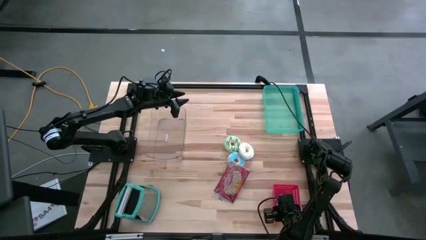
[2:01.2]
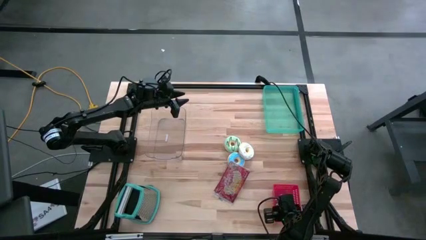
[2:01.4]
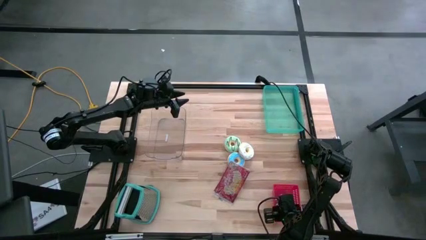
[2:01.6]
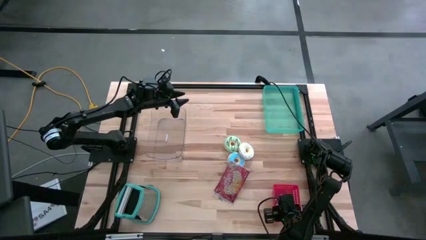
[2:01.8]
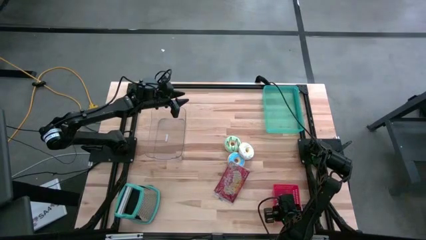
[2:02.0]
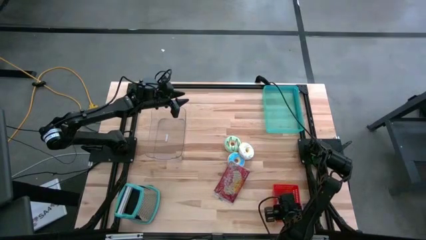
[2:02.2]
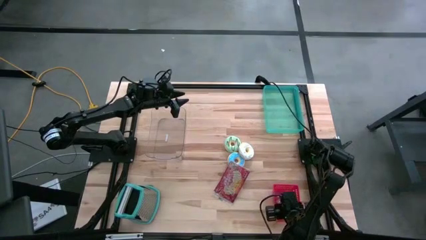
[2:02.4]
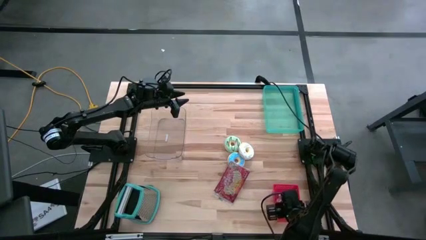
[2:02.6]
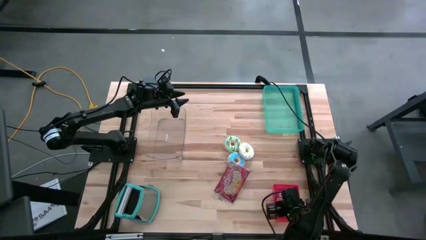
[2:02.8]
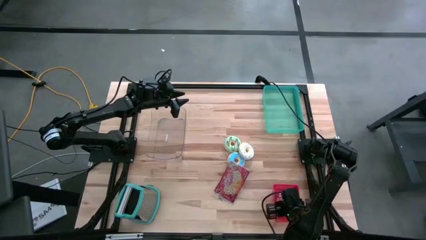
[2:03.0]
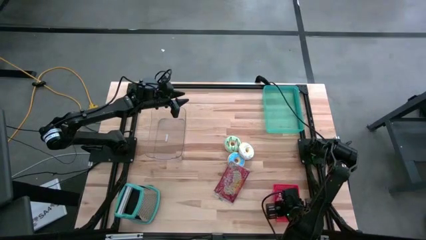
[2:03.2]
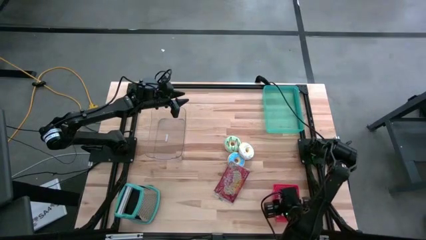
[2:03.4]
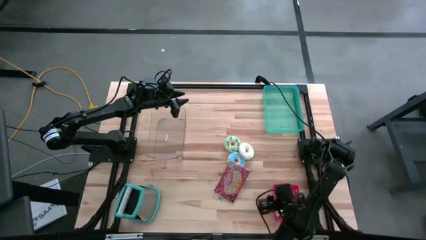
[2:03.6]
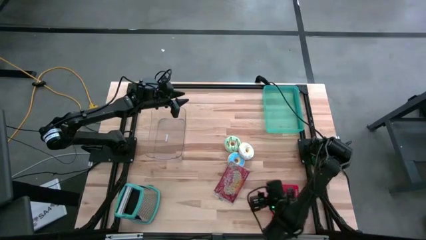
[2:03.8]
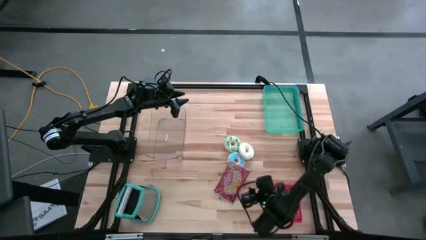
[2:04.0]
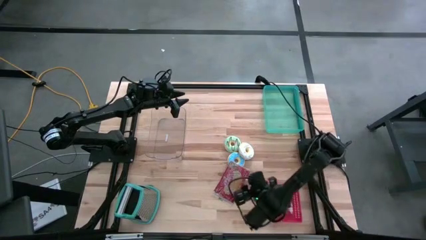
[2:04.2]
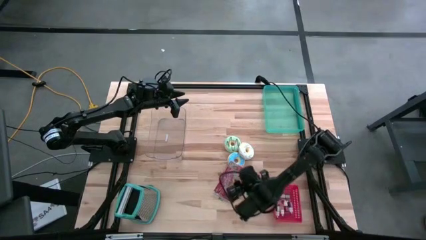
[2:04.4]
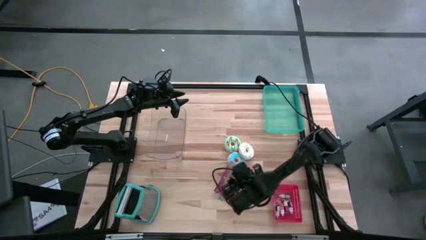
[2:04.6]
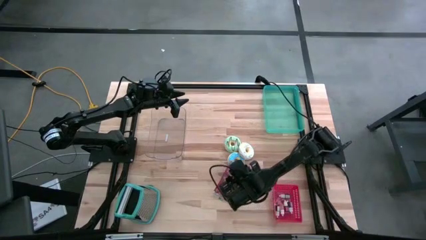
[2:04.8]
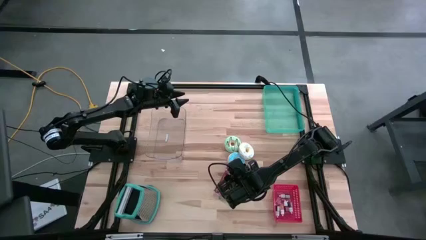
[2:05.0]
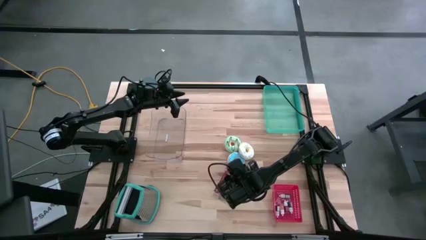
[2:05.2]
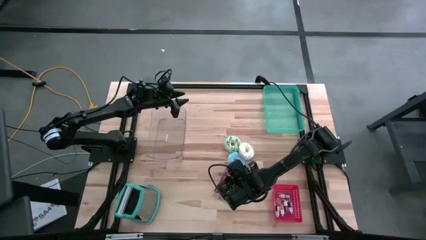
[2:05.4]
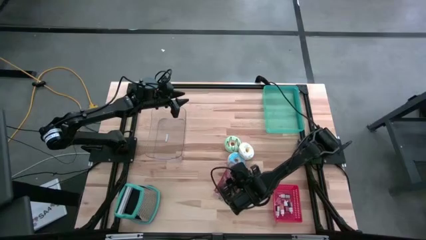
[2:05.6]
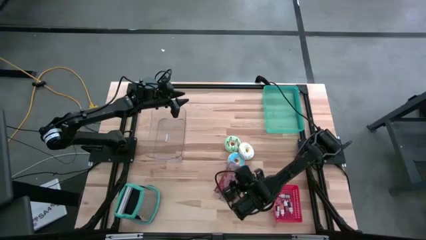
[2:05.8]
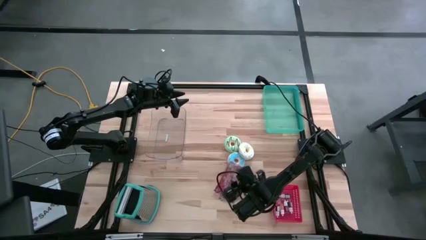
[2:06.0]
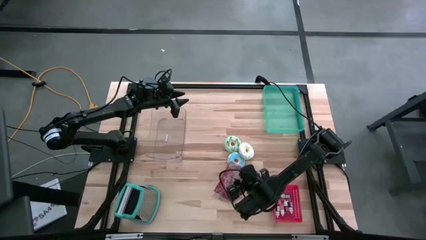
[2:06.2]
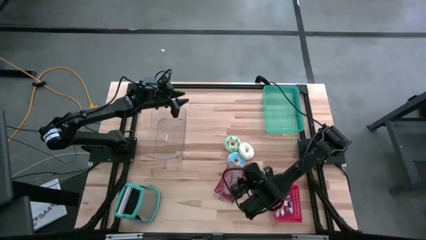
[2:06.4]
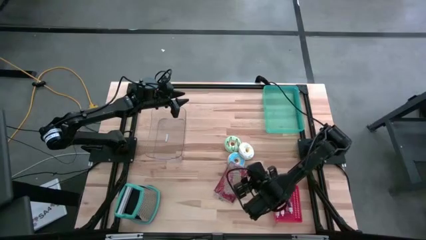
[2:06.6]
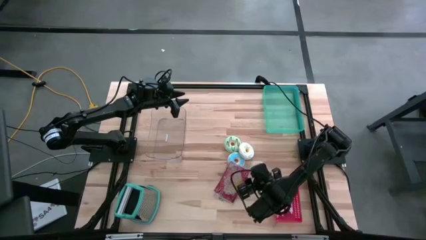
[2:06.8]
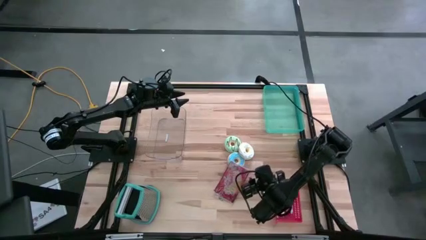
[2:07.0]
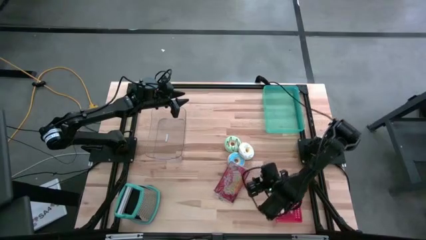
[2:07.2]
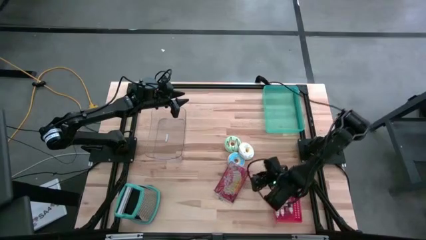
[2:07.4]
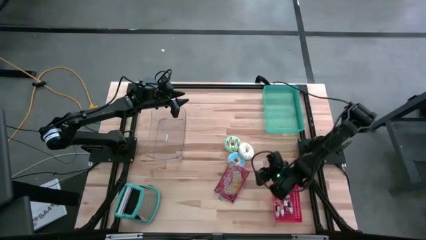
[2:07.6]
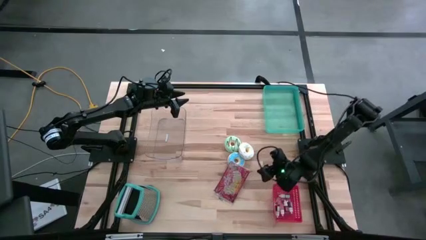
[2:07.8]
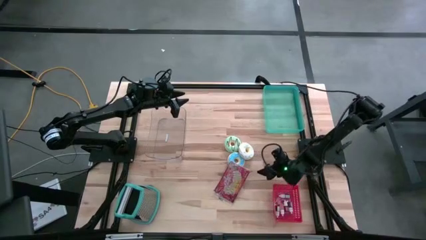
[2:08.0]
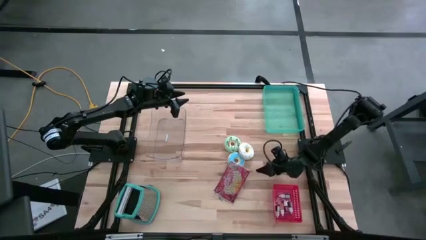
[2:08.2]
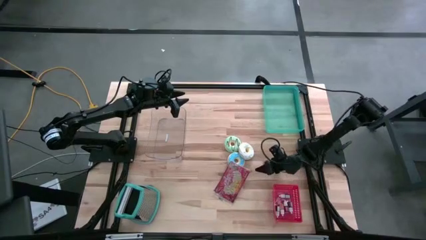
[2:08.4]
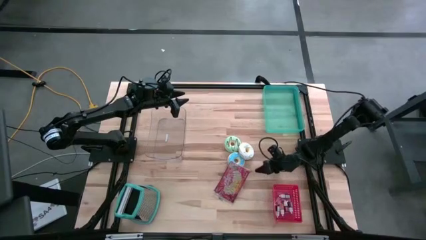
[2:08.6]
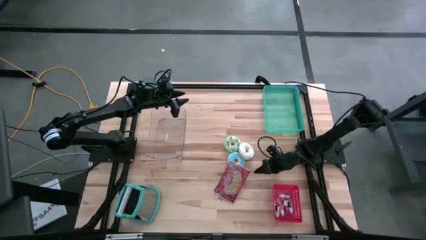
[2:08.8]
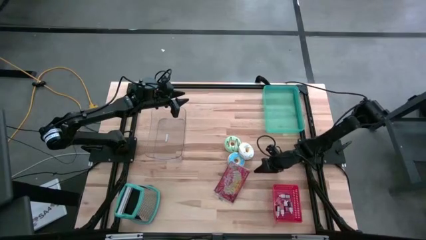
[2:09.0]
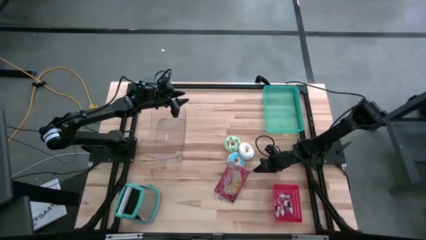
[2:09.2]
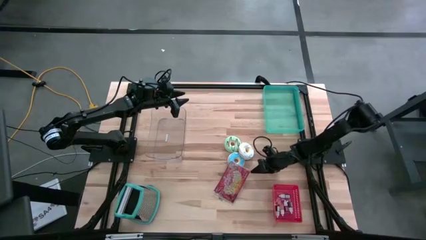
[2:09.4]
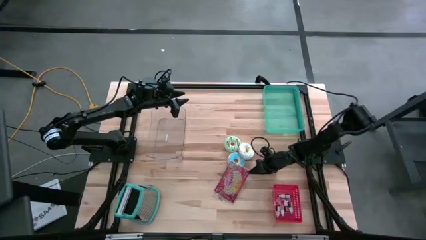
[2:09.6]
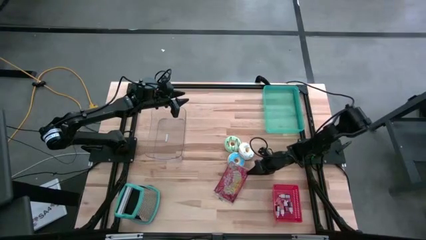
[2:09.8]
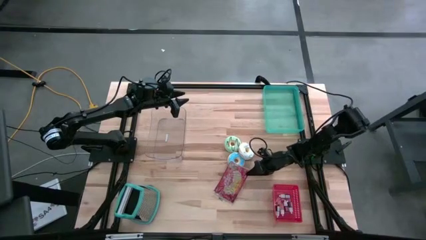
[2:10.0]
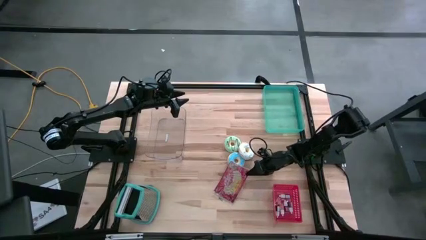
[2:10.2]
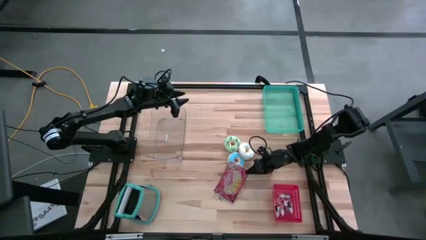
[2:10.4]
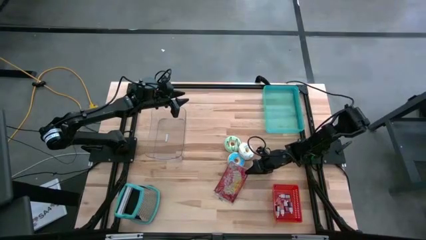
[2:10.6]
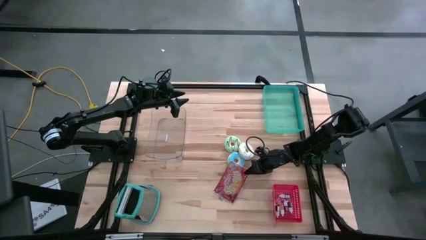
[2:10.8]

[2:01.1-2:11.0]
Put the red popcorn bag into the green bin

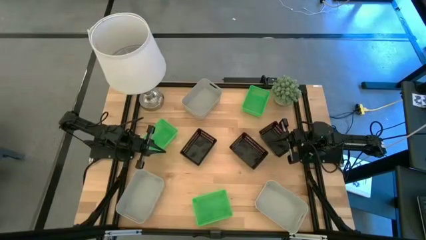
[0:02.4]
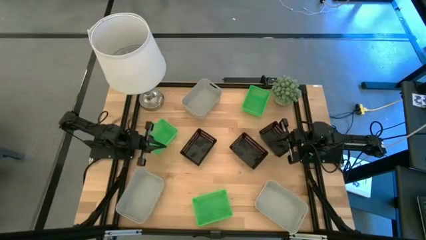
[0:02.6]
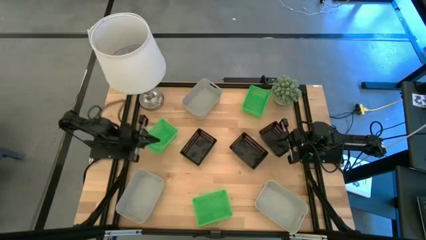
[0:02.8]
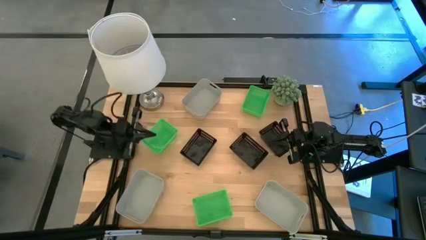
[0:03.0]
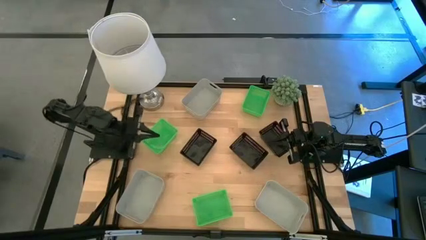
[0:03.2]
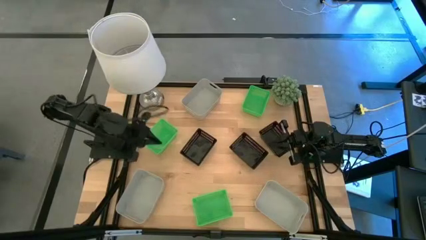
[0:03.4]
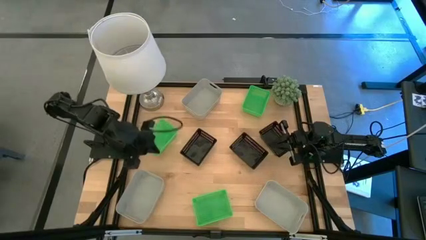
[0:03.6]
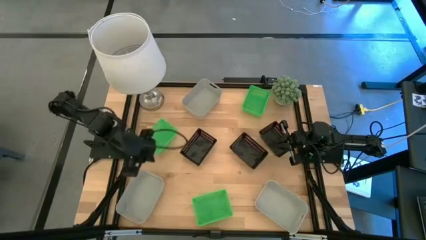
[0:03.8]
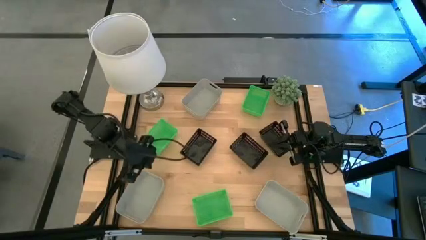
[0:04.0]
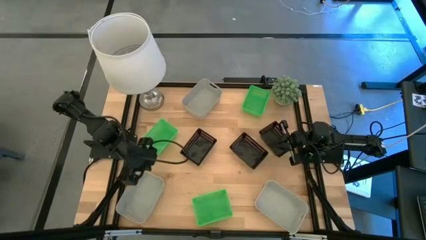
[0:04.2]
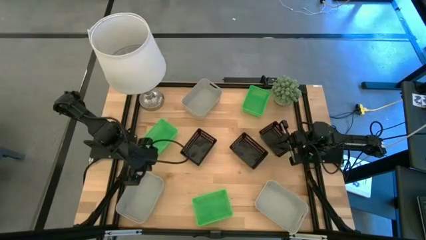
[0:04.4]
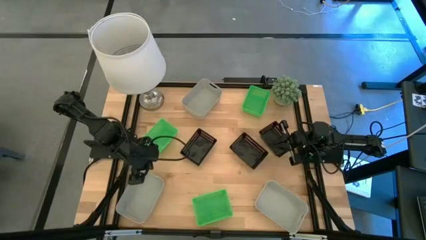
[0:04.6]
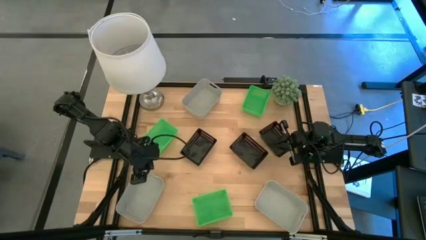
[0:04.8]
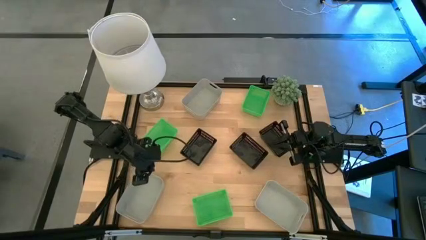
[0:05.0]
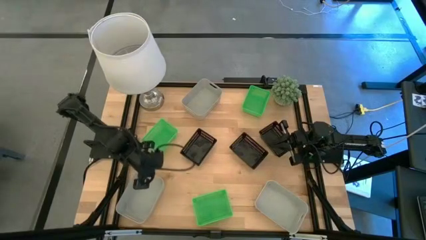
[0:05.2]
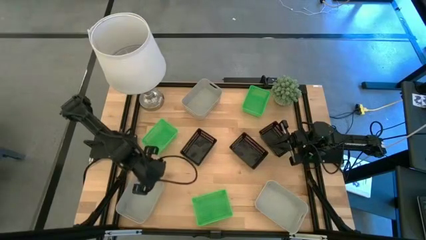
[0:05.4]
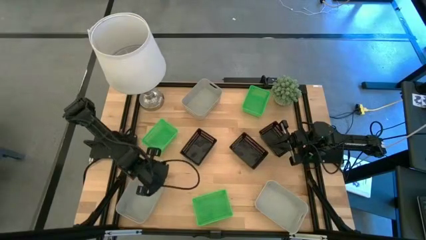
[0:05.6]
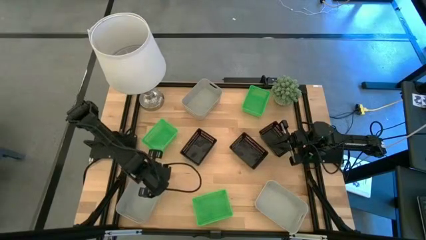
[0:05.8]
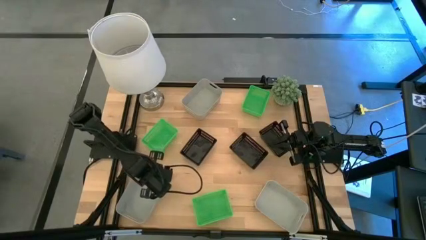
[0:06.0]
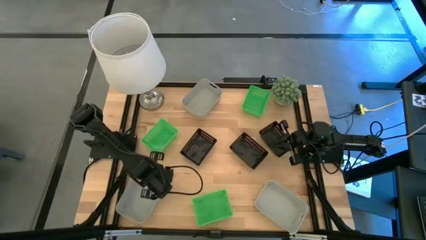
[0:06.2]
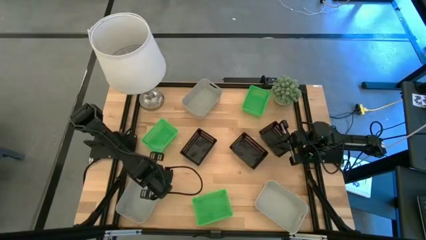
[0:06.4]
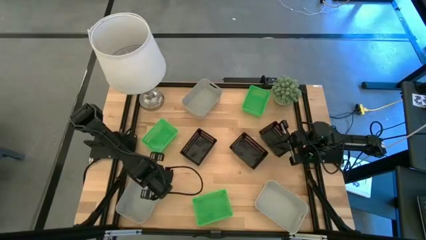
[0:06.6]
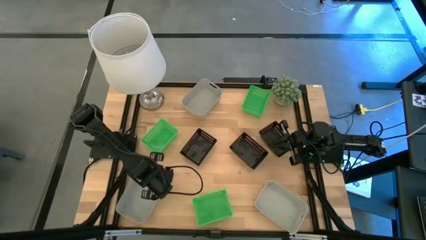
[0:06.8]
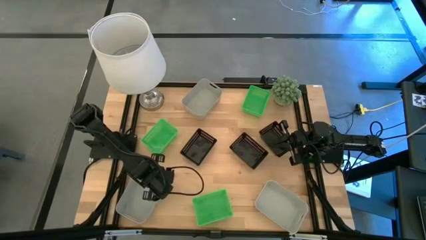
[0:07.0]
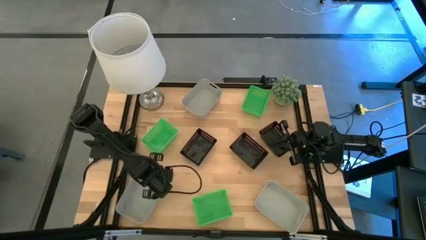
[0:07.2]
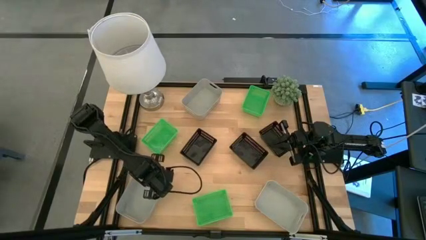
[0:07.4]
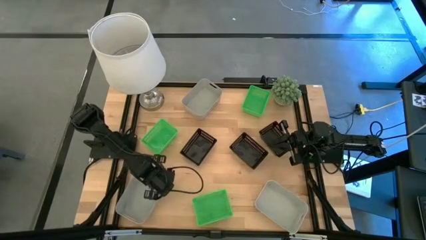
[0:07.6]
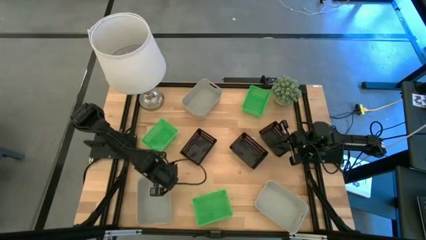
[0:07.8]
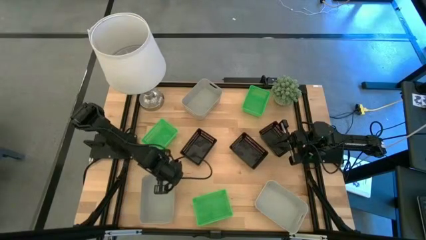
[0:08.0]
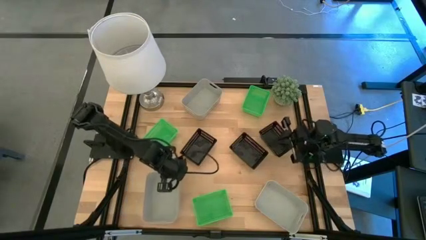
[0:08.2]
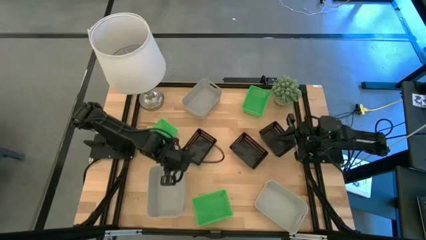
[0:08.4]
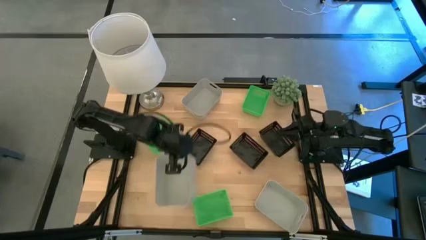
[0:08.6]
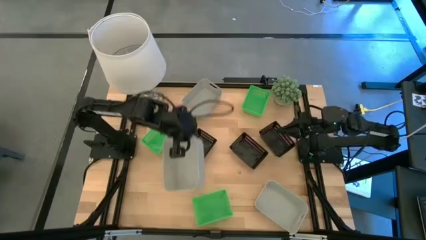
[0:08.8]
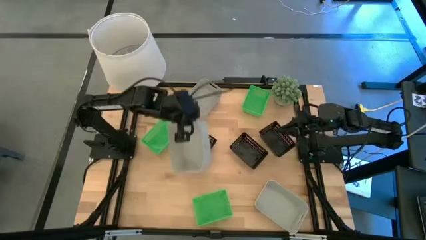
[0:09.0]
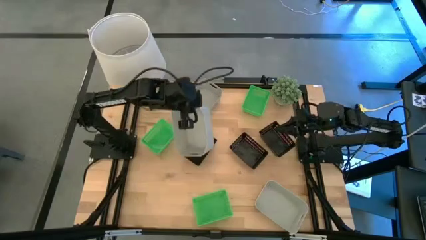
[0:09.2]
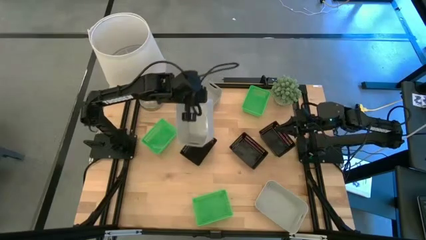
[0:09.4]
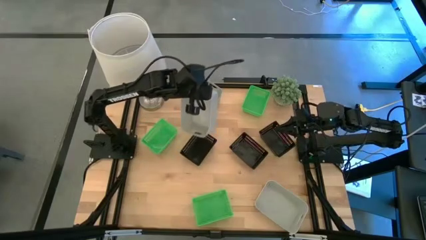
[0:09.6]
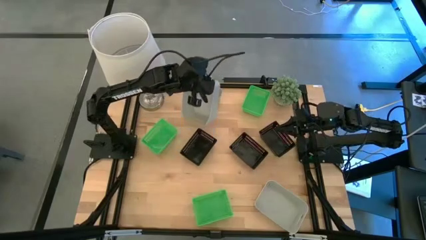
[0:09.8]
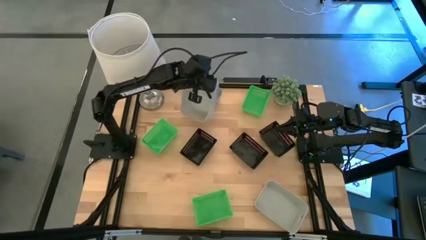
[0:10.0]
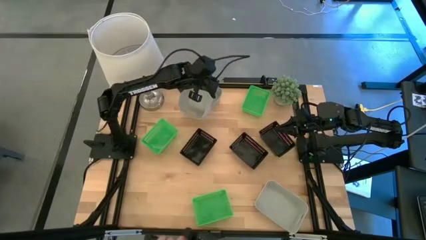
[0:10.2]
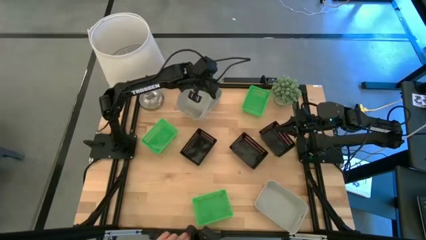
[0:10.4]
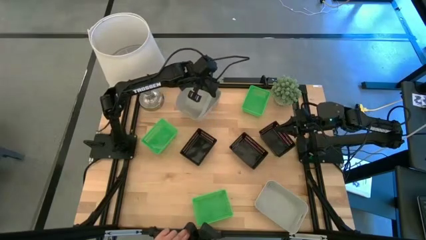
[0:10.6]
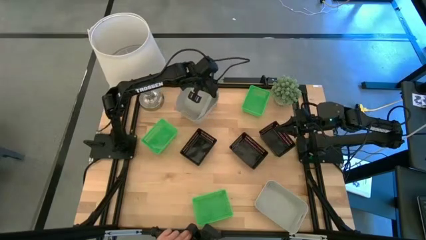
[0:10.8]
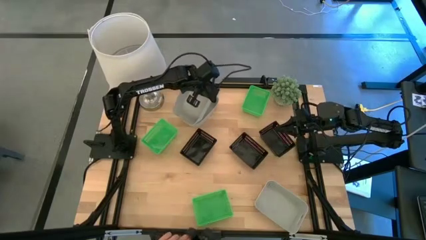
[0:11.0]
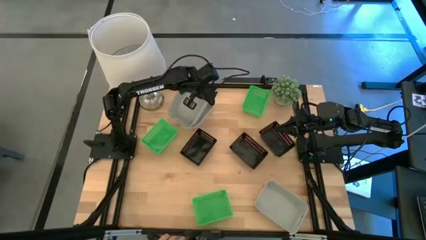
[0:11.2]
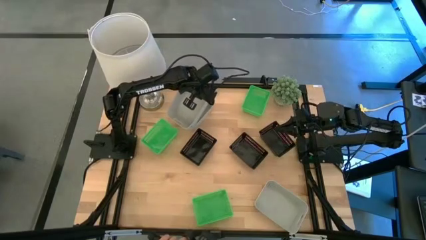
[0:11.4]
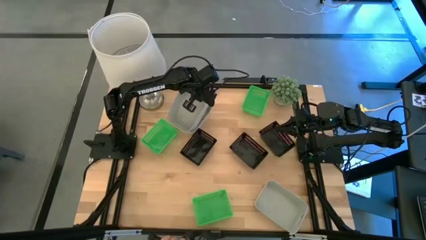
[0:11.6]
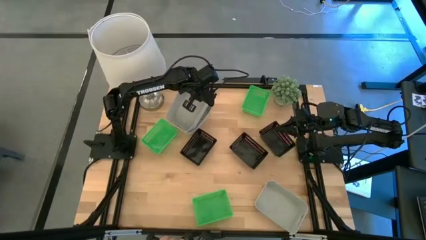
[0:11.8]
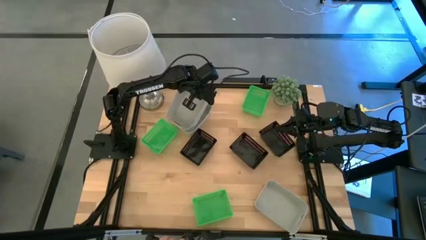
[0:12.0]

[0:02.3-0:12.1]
Stack the bottom left gray bin on top of the top gray bin
